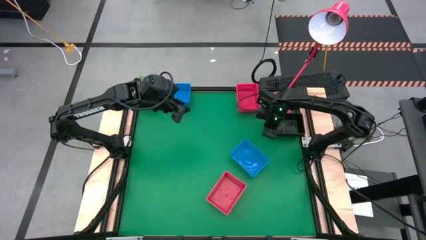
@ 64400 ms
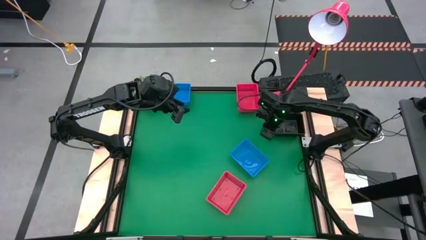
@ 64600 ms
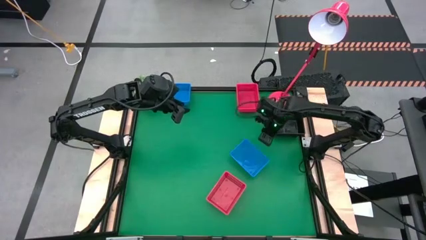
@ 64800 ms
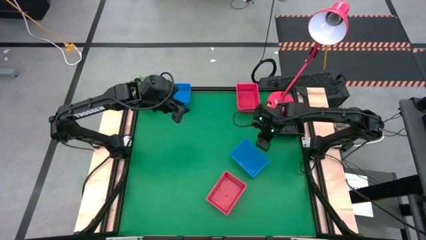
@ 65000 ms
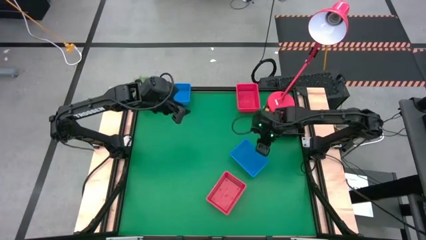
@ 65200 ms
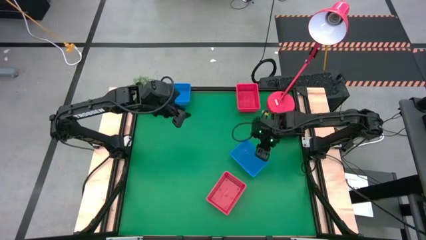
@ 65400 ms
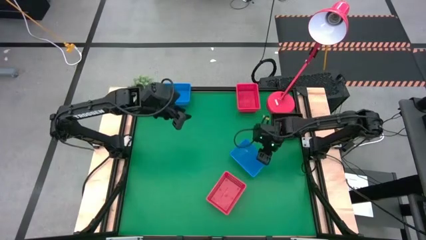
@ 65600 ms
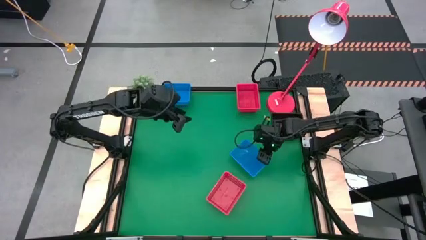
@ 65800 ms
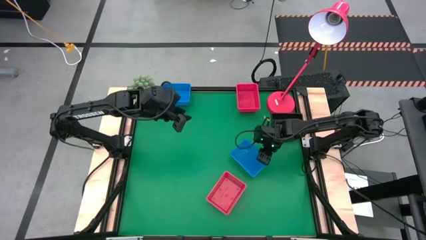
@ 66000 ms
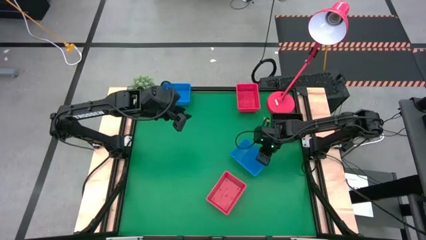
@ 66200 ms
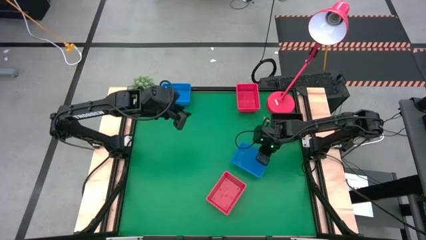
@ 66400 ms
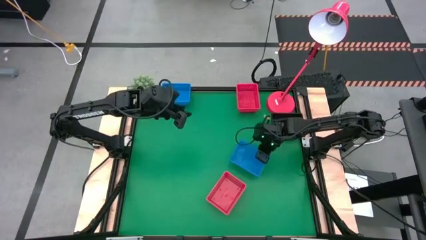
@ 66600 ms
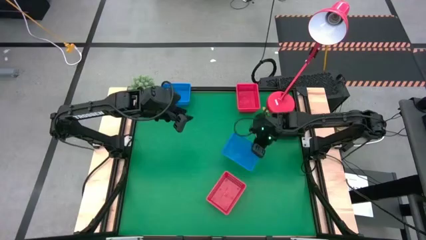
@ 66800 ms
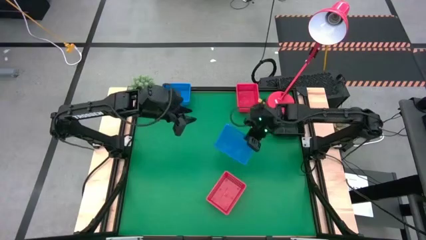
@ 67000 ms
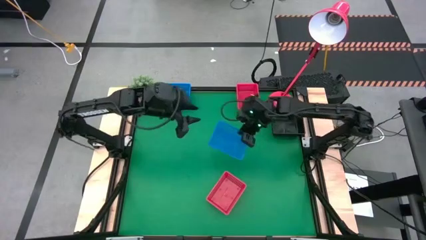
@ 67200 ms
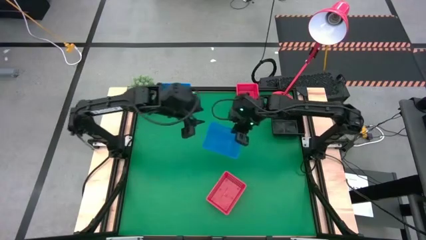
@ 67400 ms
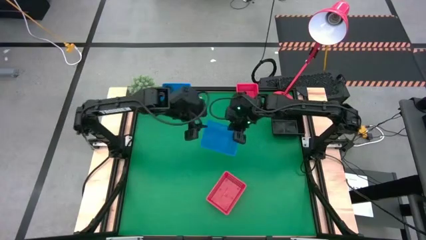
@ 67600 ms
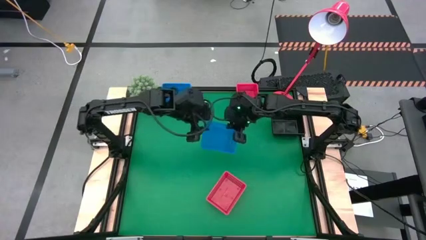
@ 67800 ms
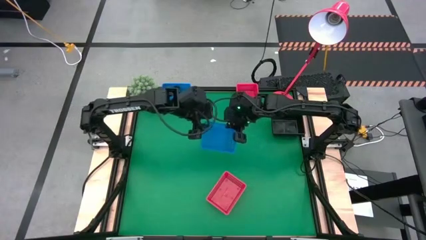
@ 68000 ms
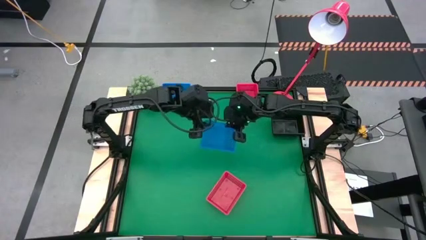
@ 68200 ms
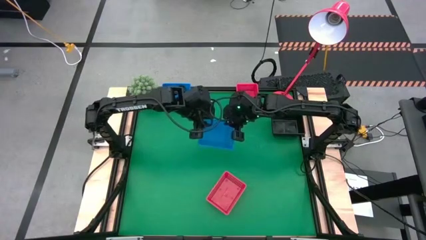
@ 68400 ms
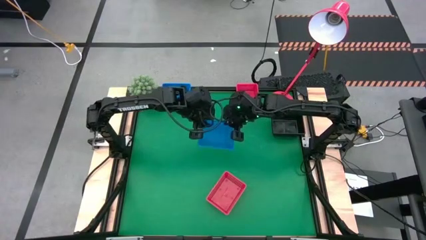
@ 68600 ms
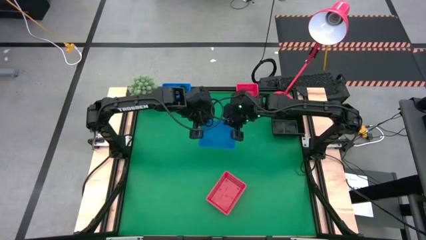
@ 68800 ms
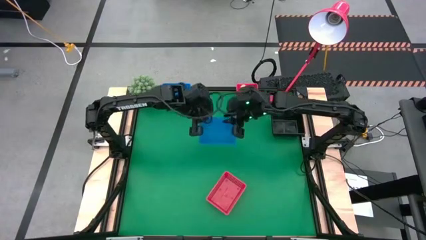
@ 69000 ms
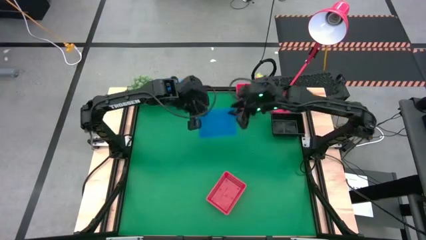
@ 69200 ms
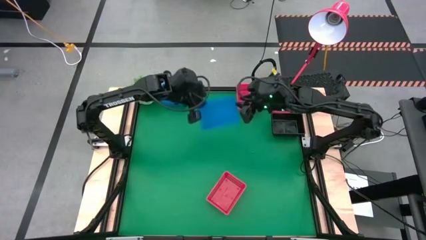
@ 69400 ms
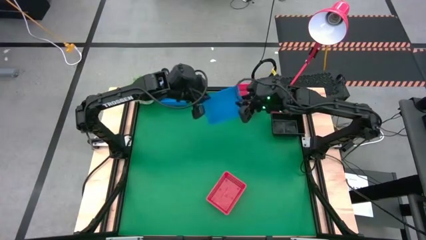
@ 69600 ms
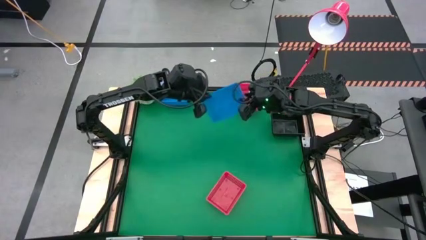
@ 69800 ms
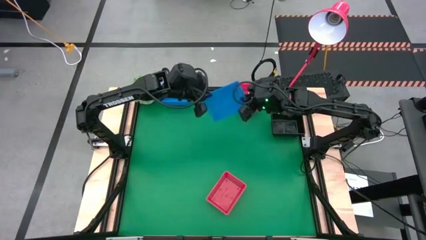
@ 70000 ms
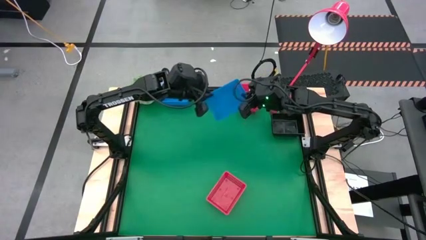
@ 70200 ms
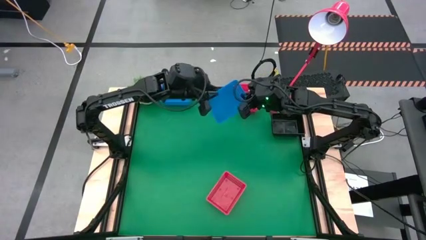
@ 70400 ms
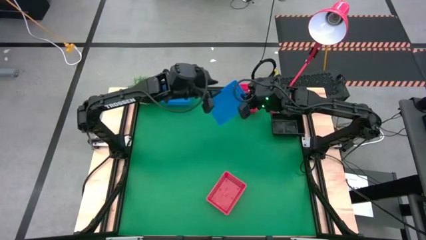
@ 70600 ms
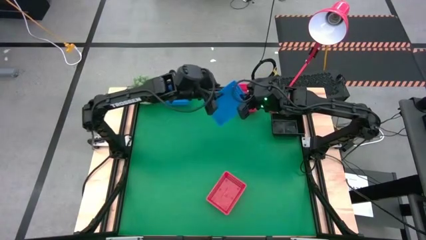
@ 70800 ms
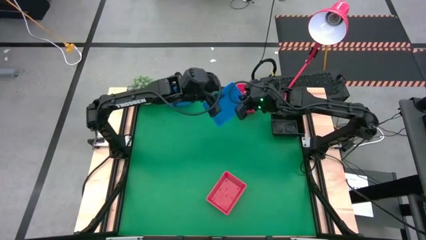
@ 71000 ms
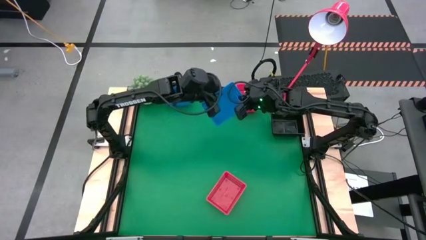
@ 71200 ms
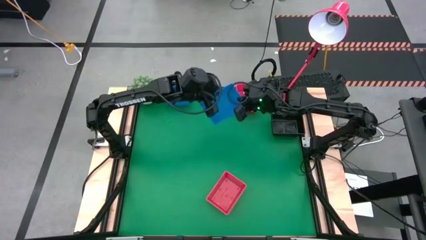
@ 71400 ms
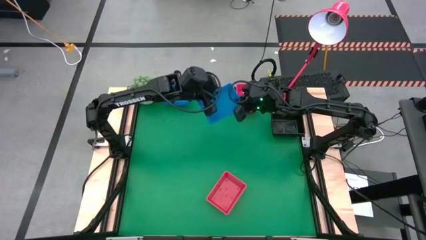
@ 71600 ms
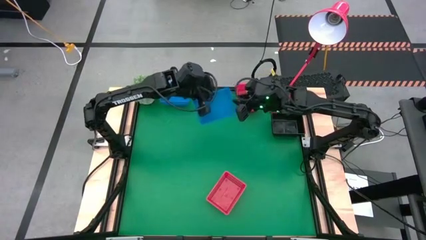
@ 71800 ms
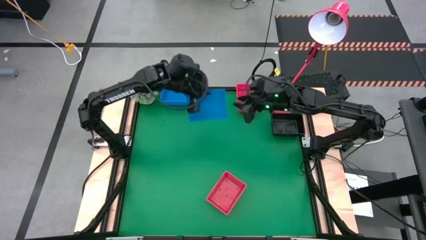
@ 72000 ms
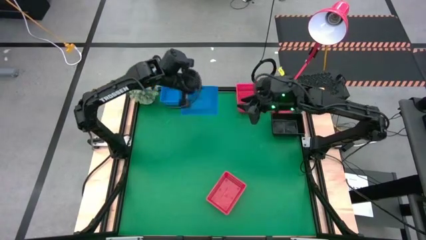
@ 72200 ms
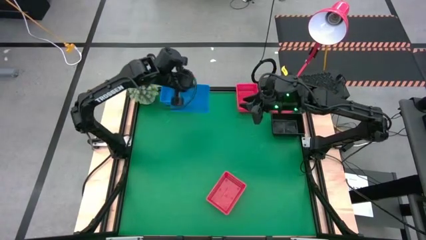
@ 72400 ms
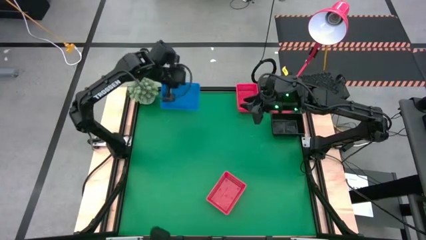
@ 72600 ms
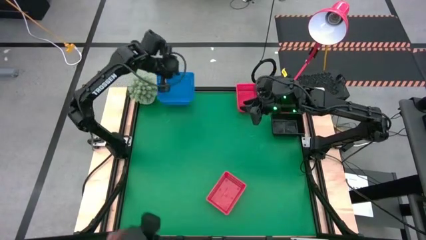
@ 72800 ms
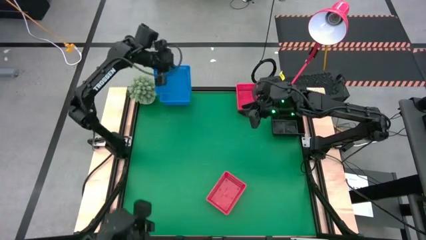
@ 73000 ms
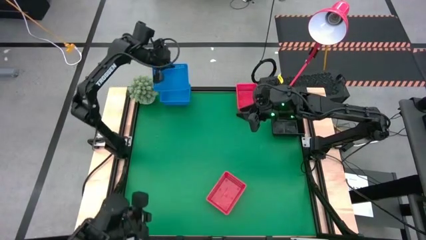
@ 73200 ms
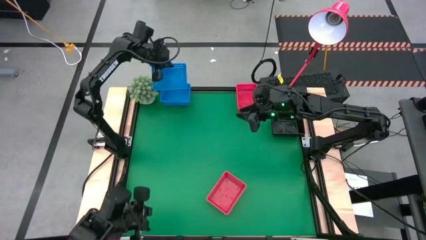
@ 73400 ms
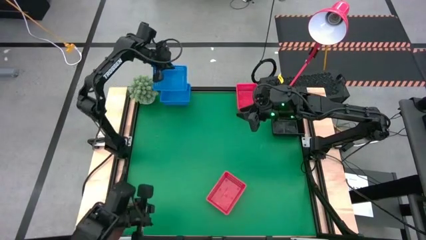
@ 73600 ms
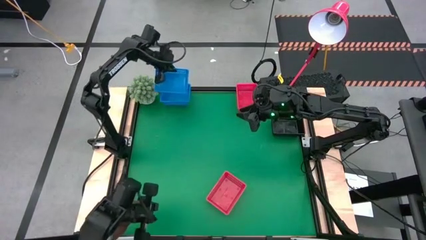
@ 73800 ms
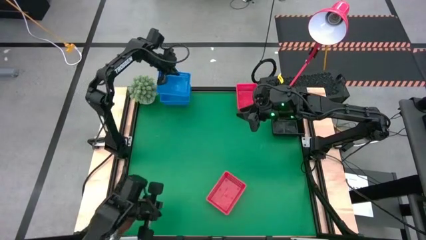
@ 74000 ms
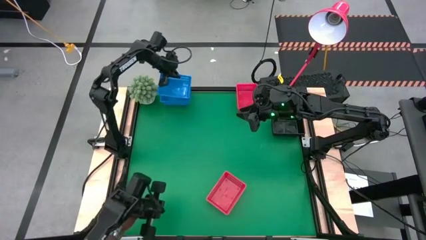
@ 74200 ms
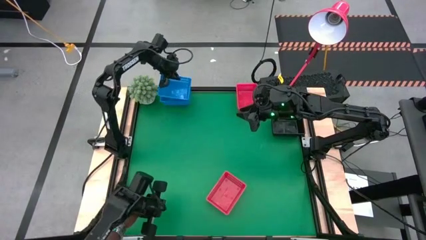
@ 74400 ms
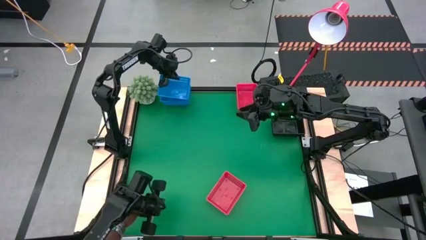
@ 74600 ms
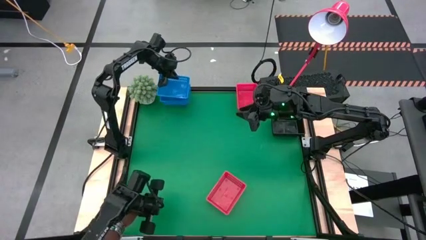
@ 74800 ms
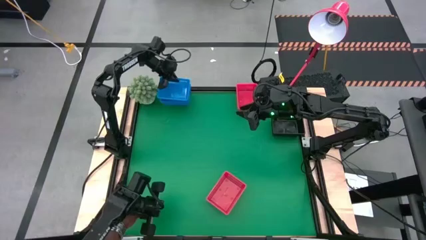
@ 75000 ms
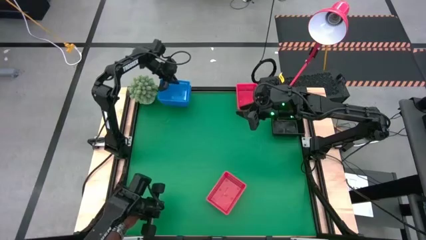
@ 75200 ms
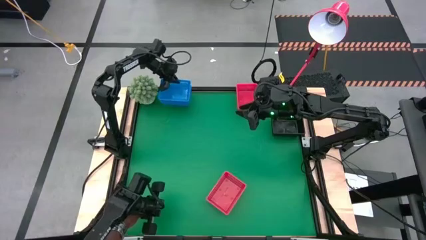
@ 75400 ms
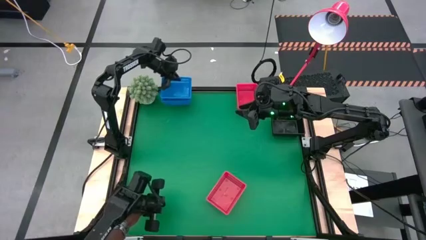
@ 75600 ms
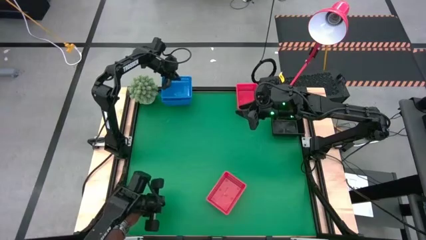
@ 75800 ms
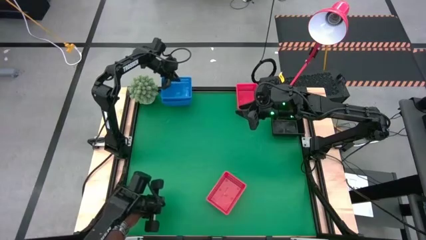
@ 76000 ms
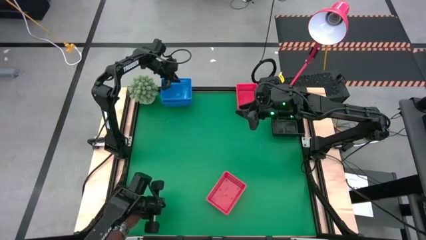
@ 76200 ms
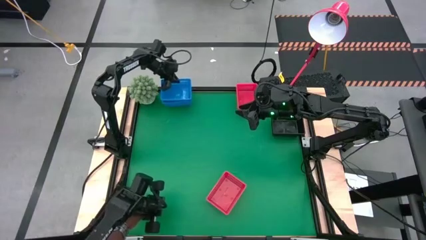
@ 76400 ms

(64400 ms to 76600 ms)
Stack the blue bin on top of the stacked blue bins
